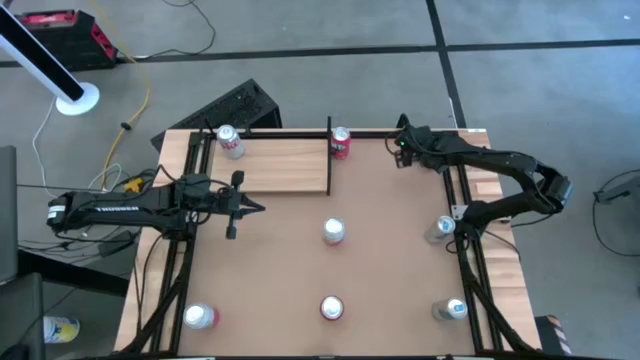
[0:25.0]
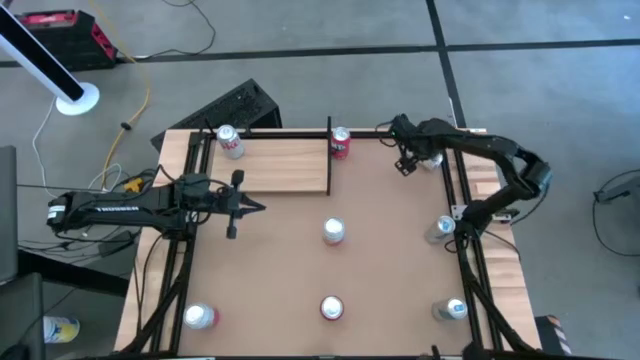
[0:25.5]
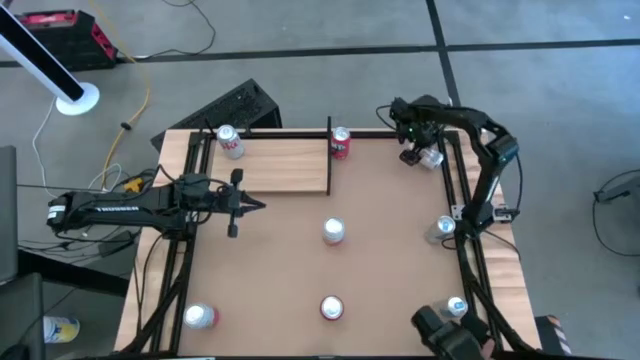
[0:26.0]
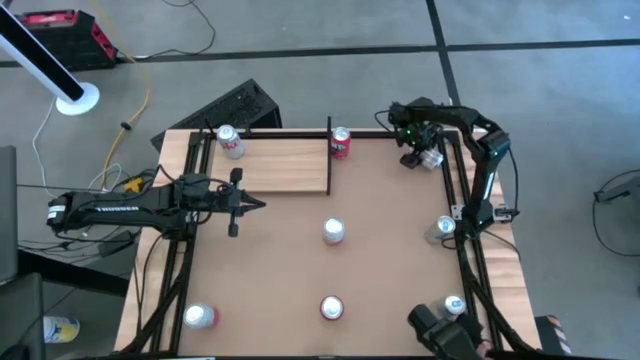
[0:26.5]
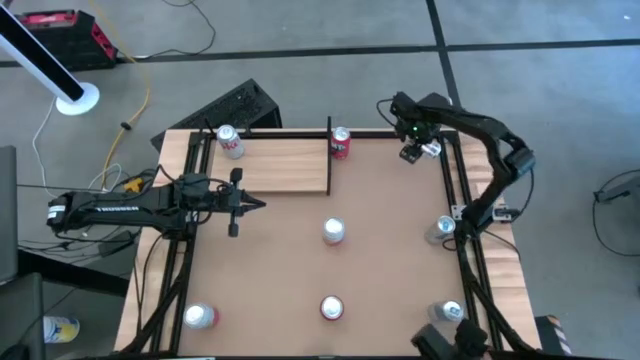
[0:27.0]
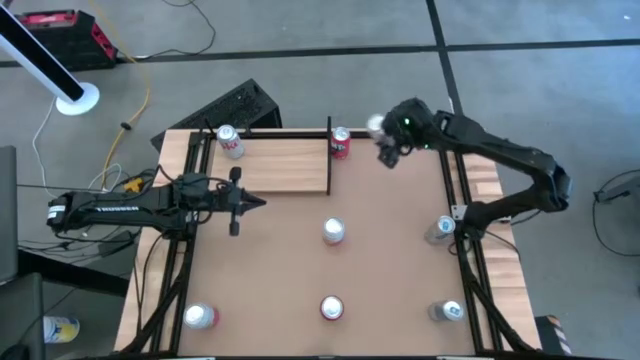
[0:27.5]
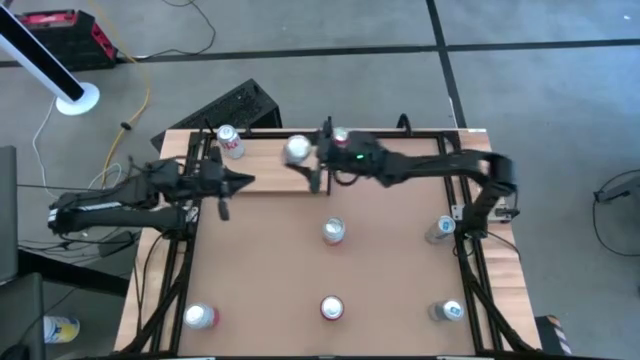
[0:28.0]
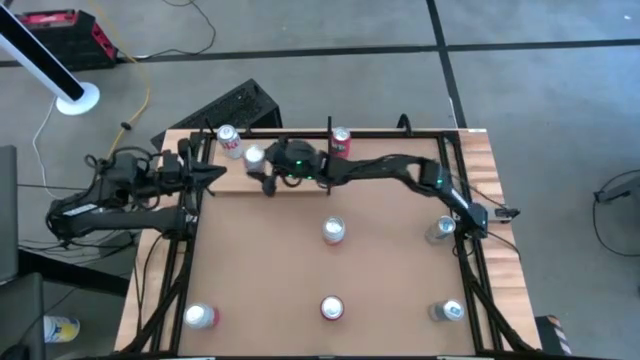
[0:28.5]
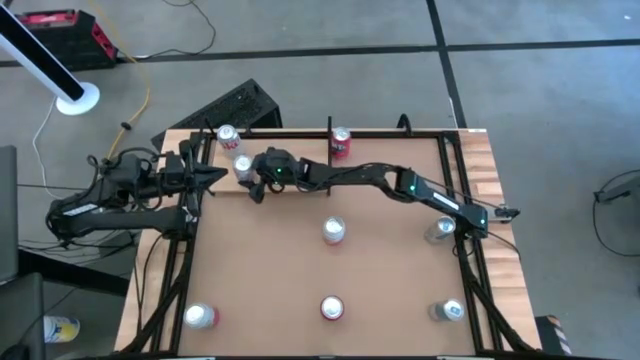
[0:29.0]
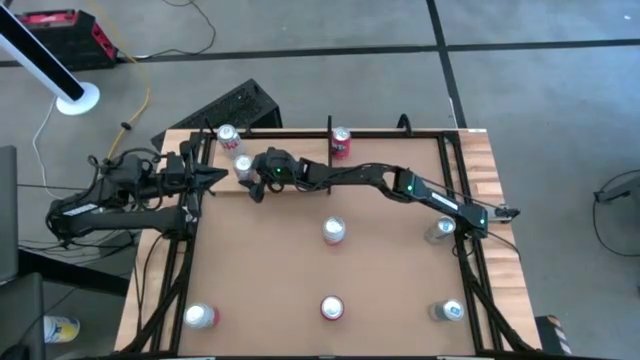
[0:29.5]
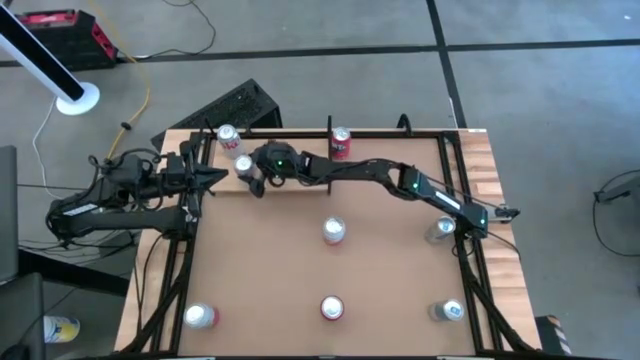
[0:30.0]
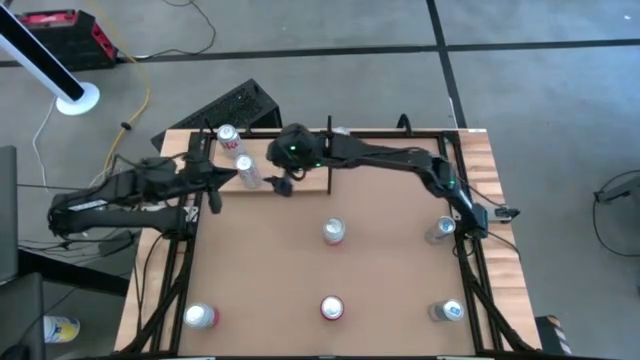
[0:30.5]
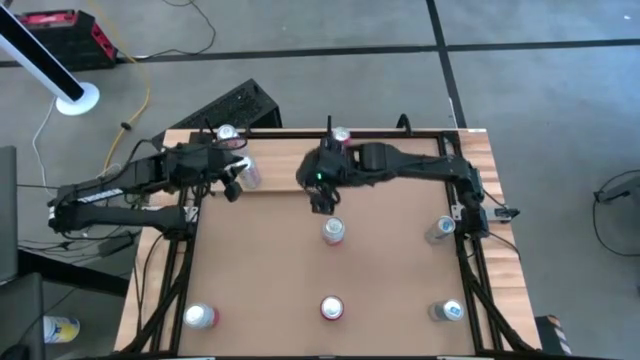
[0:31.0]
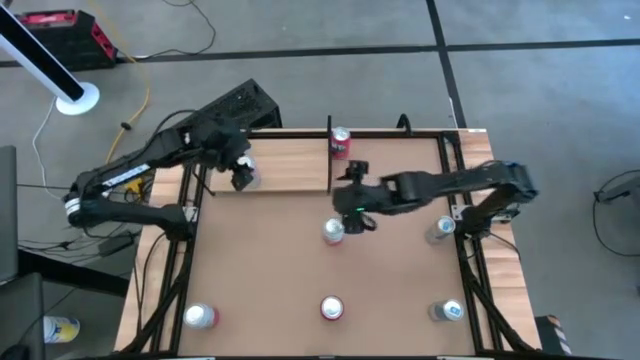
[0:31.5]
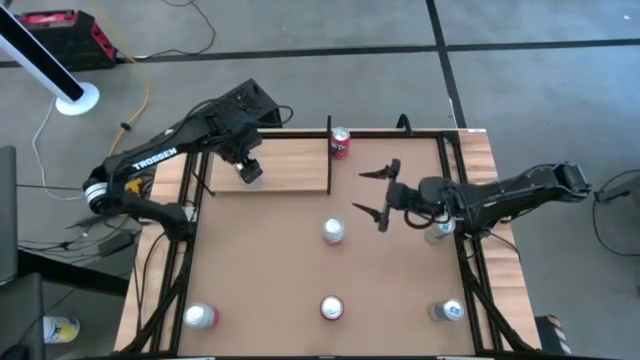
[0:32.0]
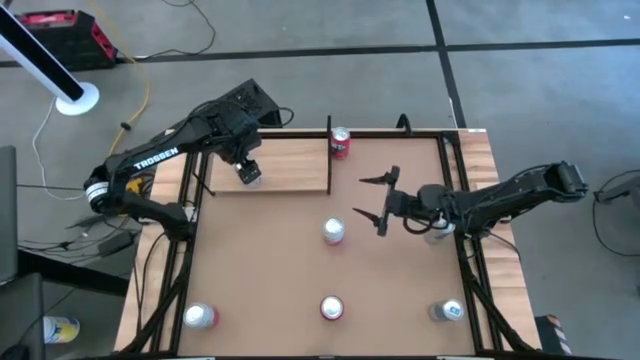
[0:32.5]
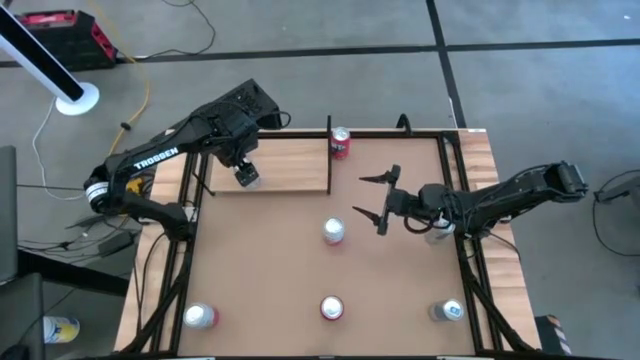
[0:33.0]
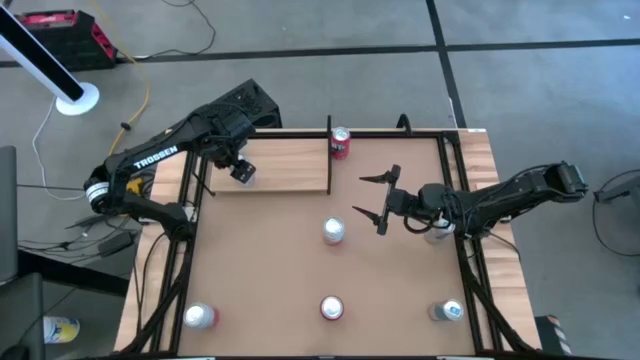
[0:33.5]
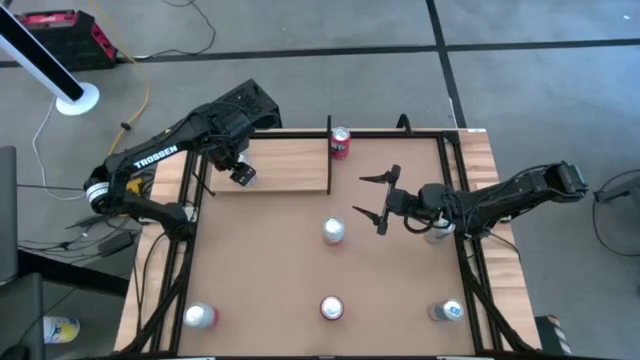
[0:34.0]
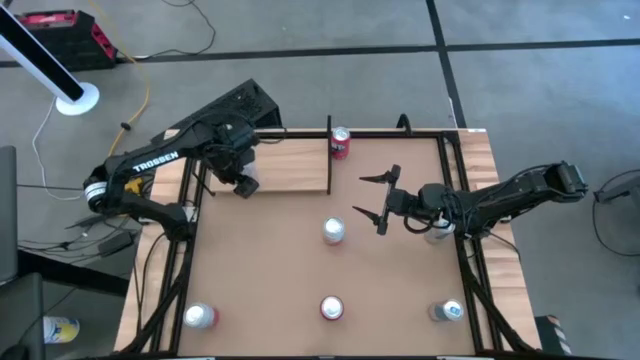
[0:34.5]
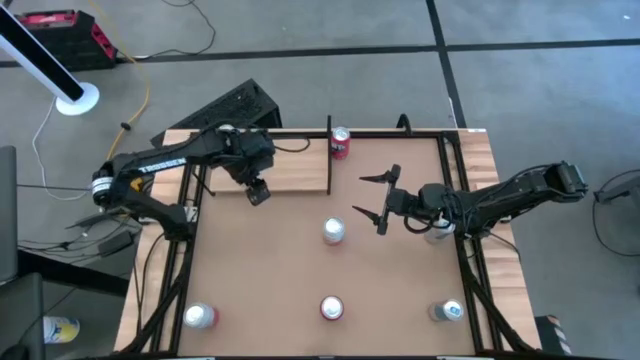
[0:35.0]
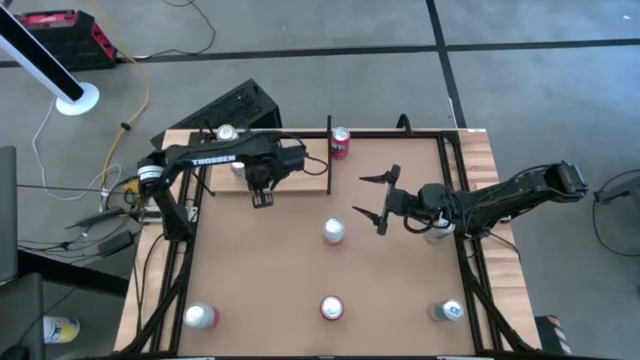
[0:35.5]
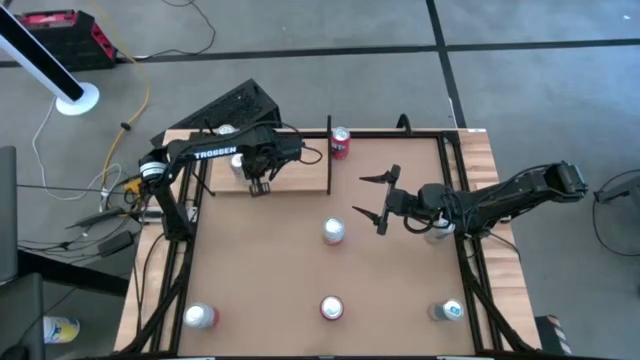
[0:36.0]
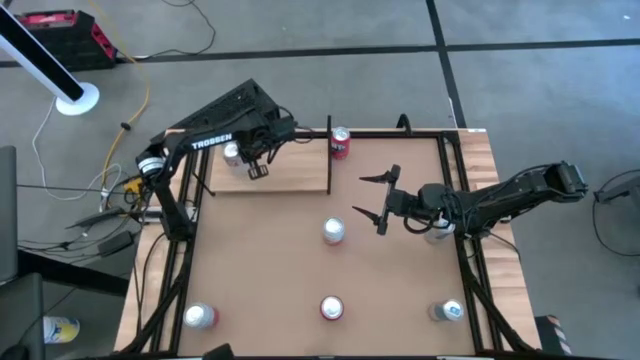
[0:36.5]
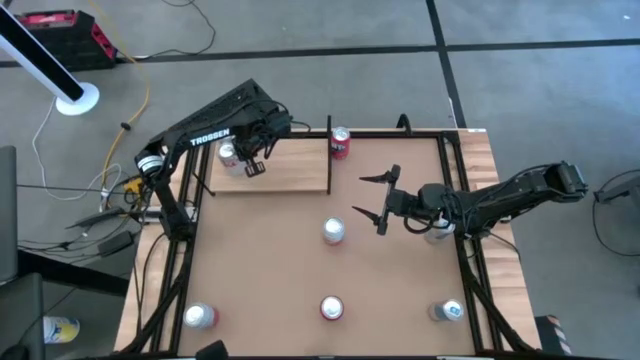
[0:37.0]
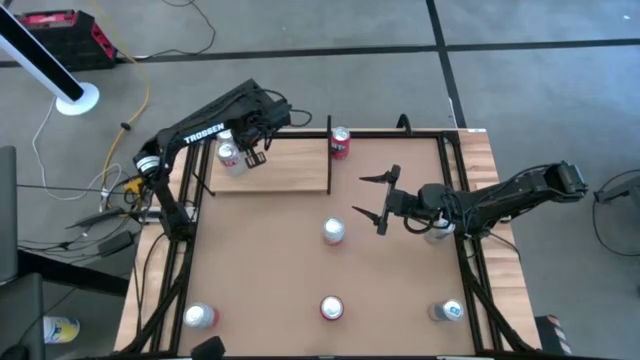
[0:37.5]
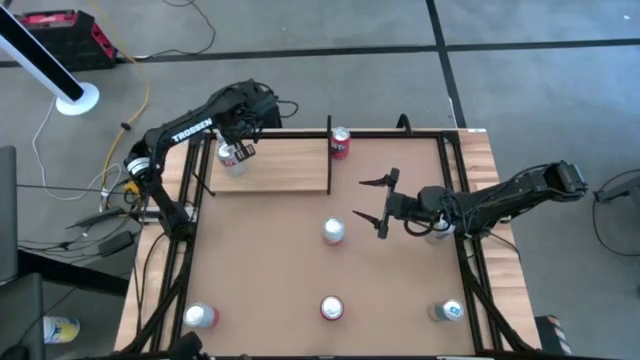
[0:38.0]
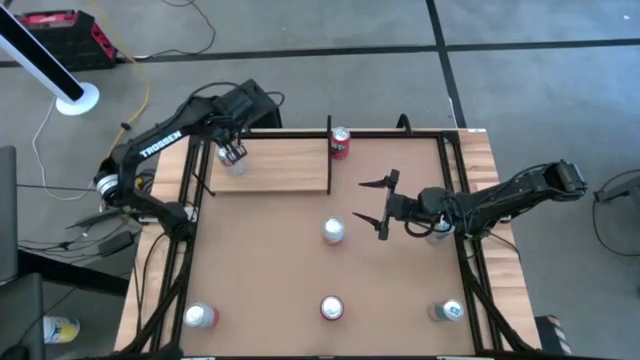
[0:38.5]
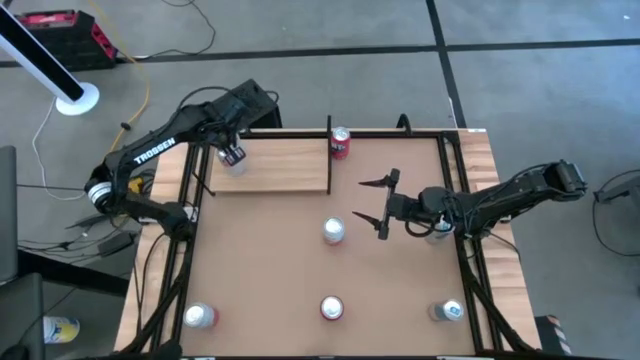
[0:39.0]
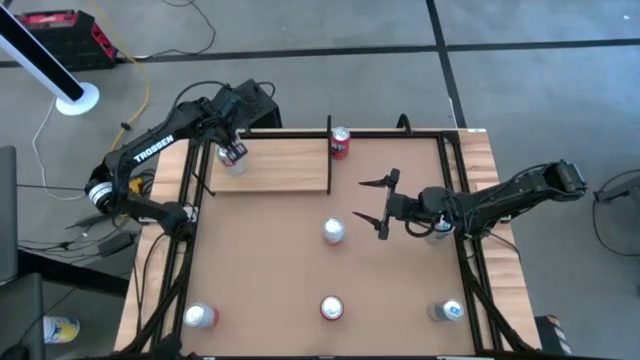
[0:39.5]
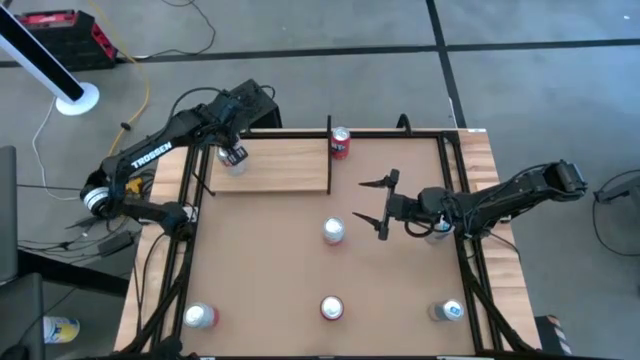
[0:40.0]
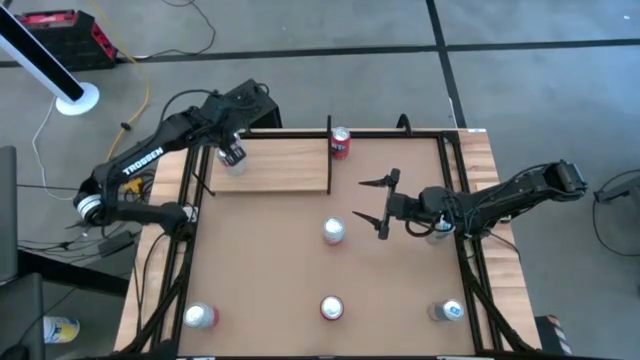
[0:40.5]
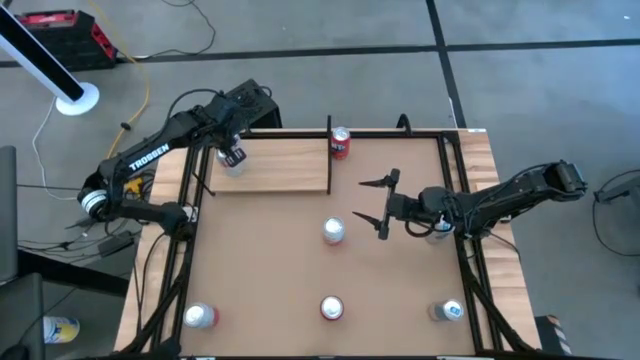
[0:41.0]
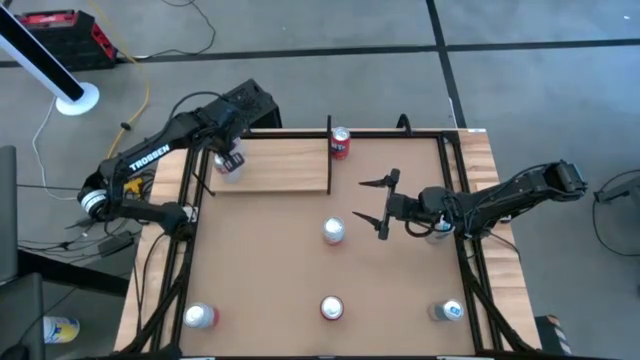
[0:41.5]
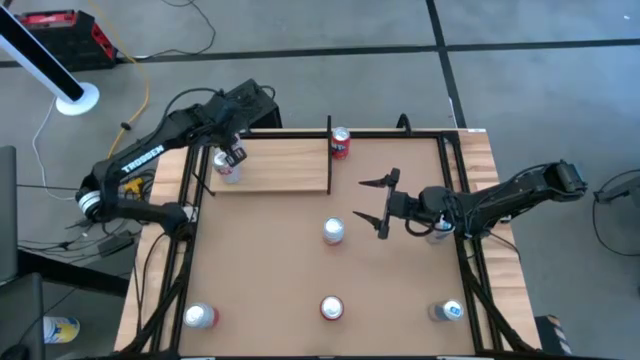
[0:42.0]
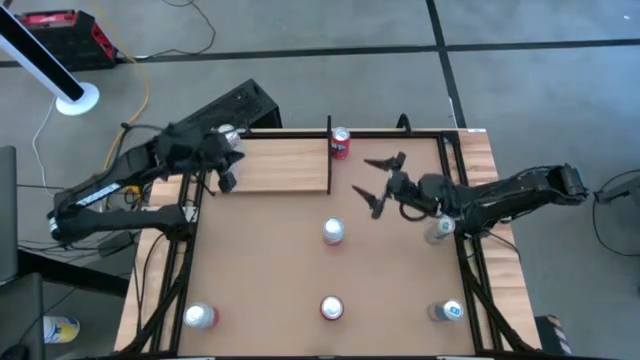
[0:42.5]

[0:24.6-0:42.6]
Task: Place canned beverage on shelf
Put the silver soda can on the shelf aligned with the other silver soda can
